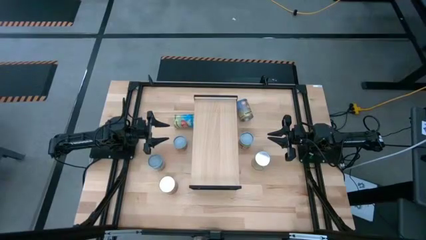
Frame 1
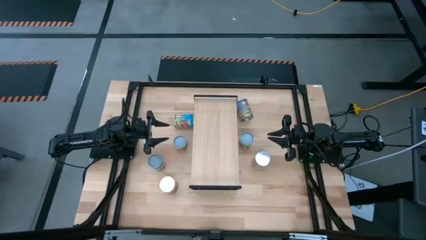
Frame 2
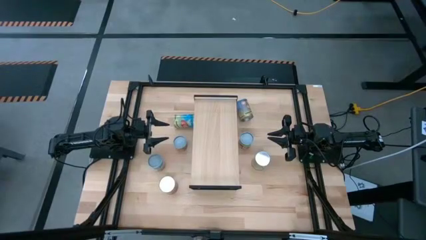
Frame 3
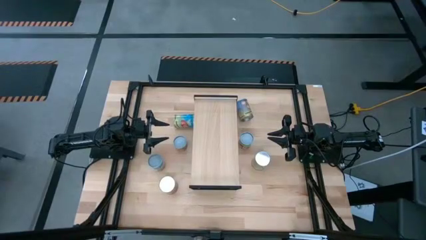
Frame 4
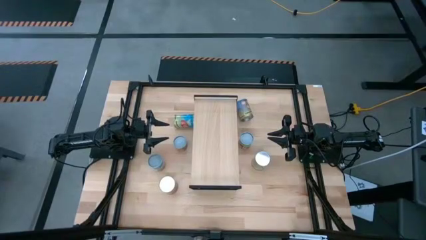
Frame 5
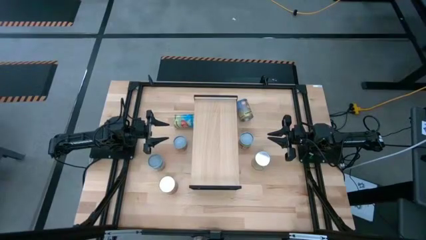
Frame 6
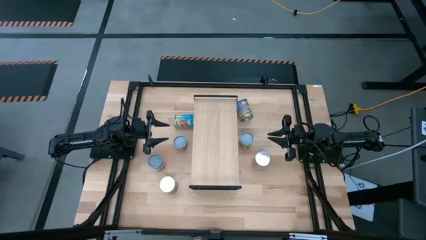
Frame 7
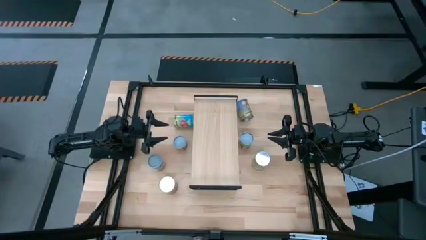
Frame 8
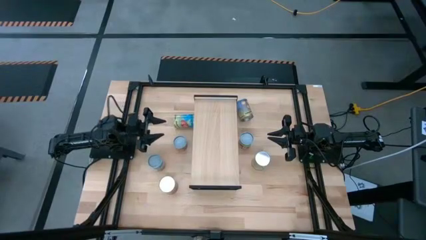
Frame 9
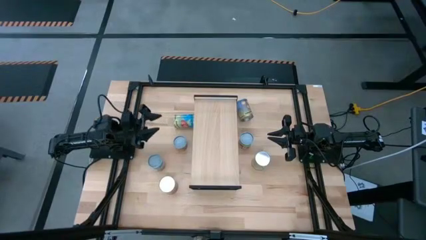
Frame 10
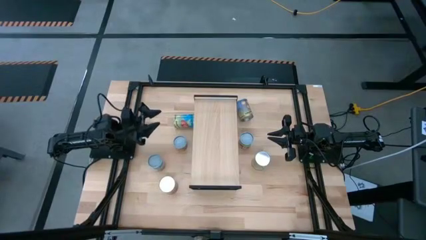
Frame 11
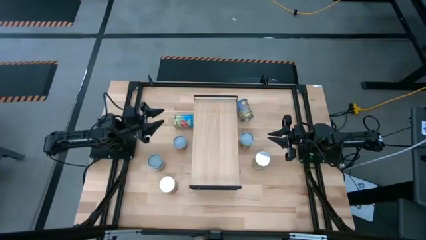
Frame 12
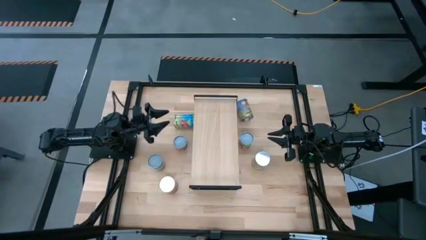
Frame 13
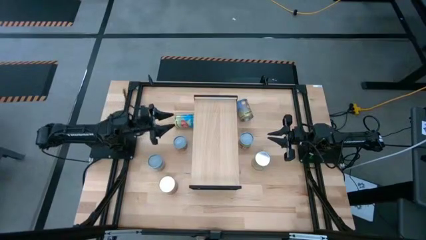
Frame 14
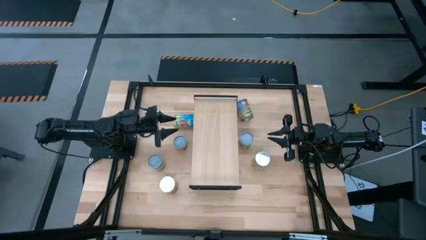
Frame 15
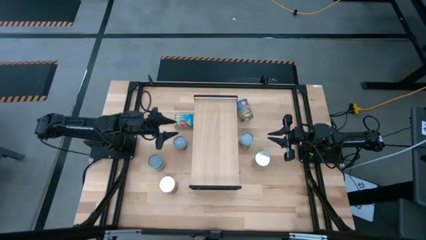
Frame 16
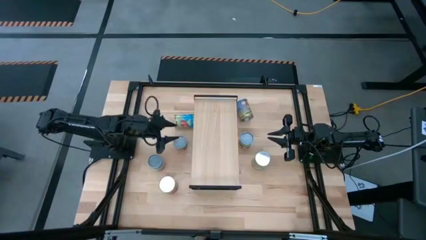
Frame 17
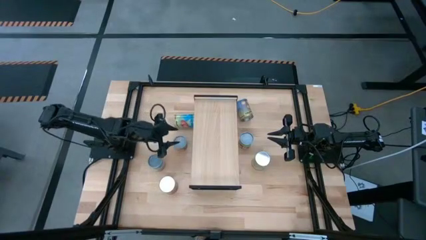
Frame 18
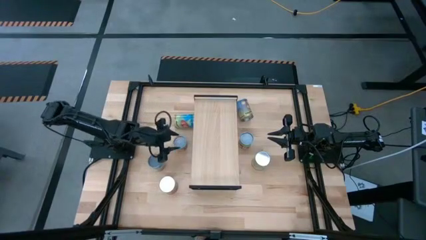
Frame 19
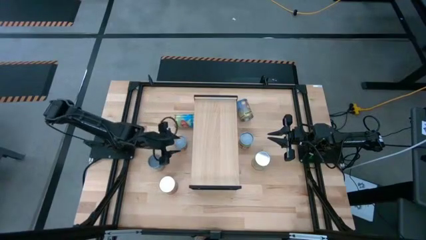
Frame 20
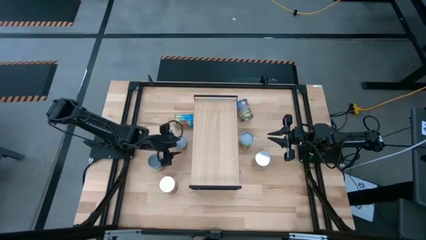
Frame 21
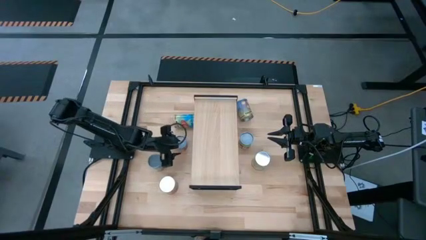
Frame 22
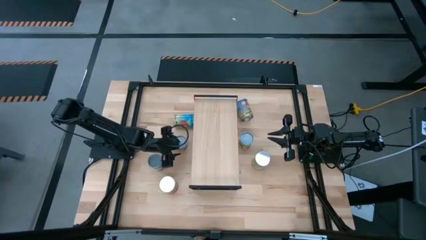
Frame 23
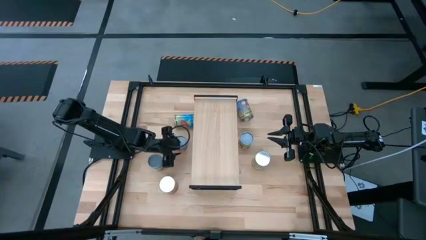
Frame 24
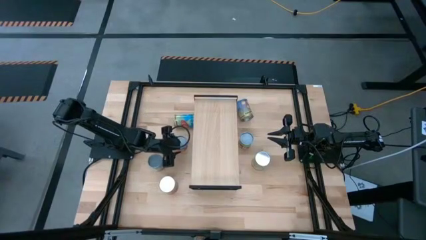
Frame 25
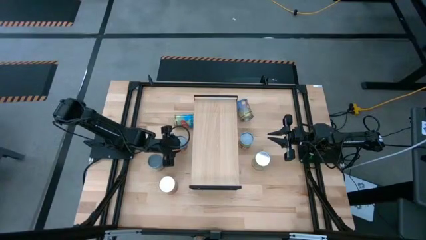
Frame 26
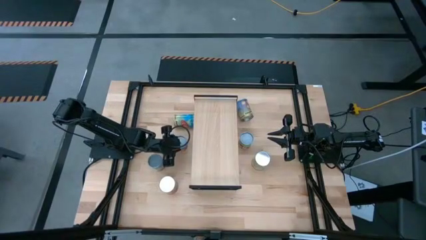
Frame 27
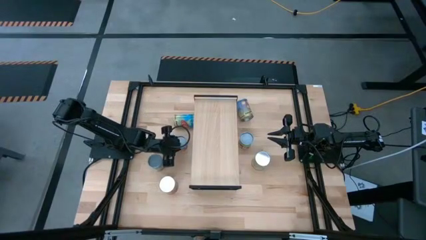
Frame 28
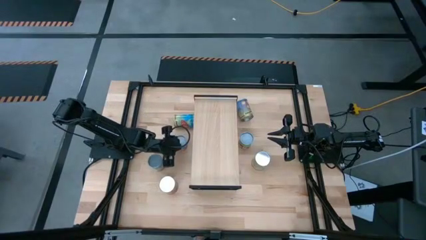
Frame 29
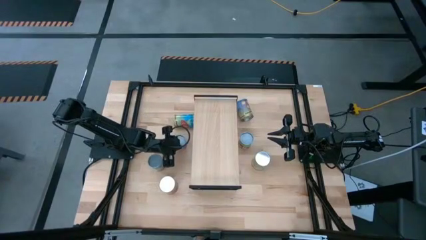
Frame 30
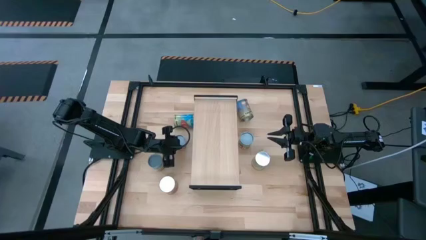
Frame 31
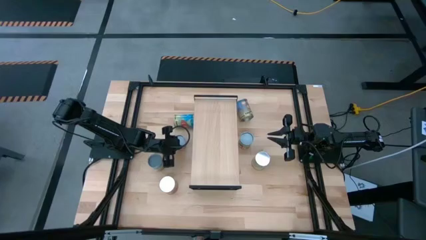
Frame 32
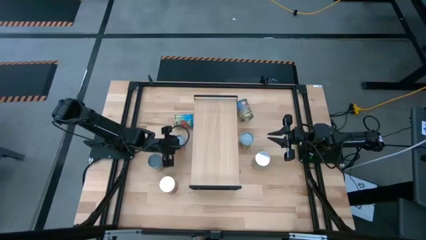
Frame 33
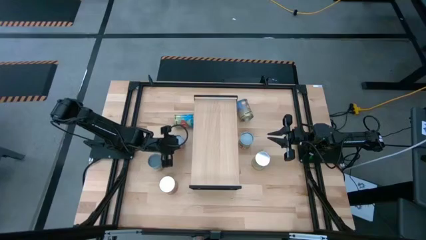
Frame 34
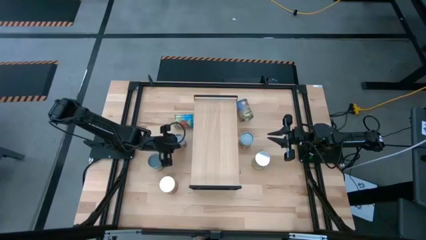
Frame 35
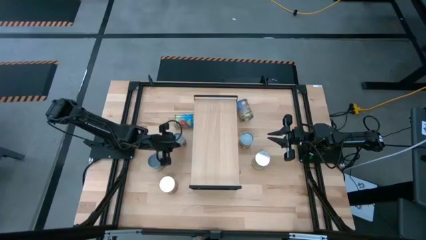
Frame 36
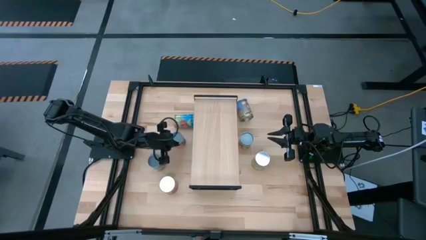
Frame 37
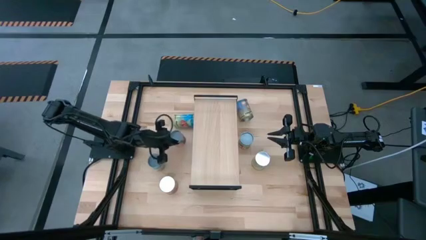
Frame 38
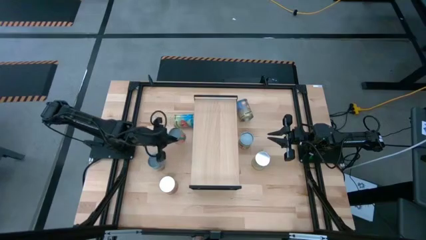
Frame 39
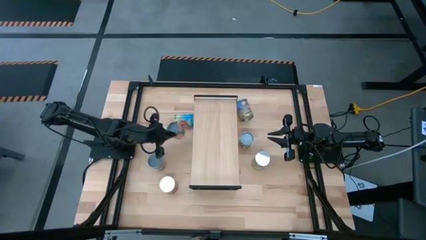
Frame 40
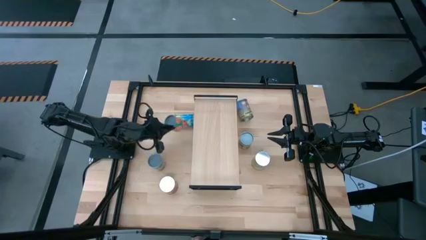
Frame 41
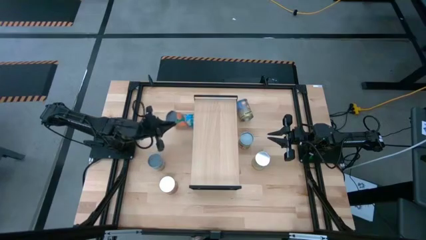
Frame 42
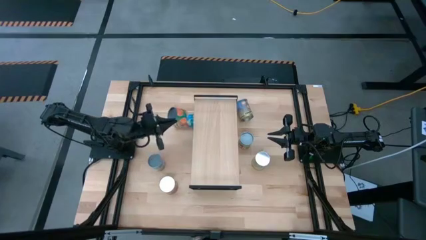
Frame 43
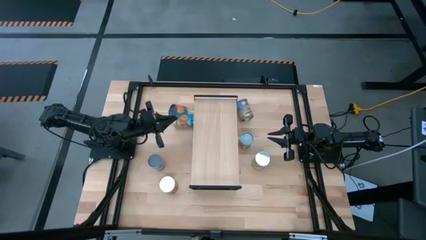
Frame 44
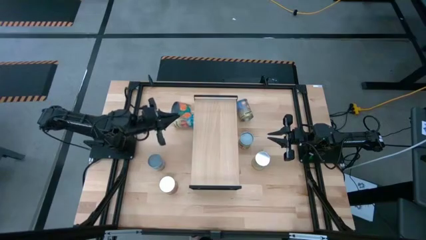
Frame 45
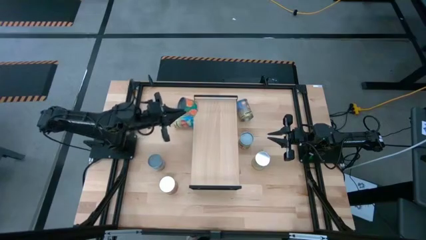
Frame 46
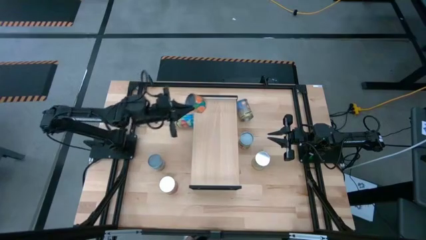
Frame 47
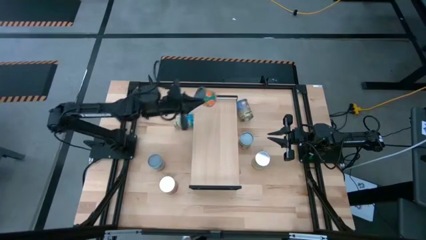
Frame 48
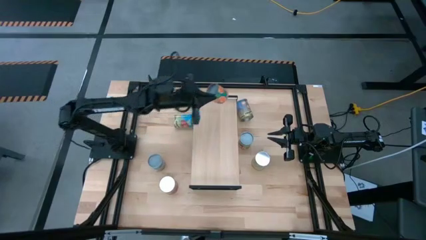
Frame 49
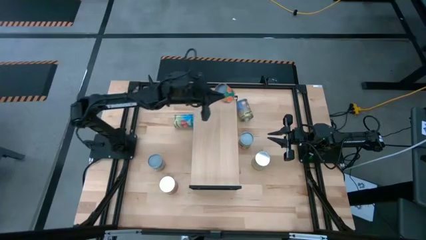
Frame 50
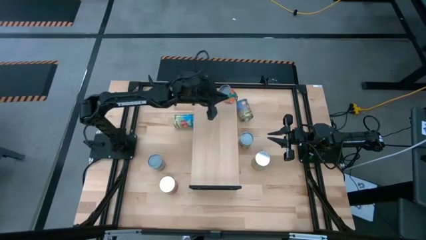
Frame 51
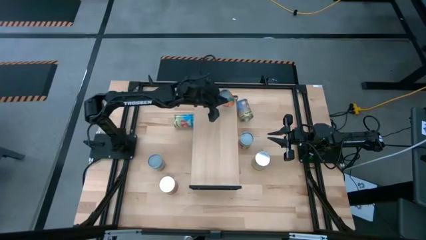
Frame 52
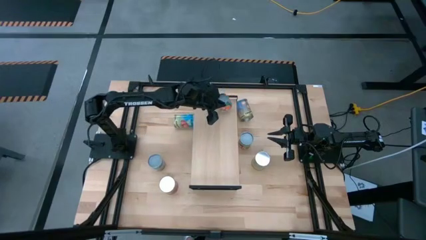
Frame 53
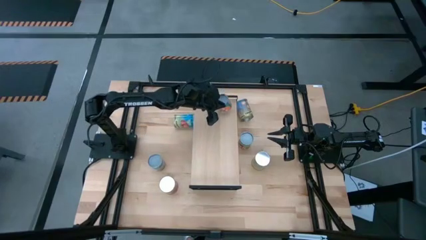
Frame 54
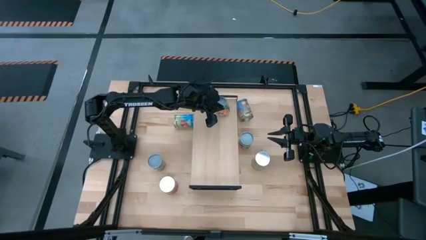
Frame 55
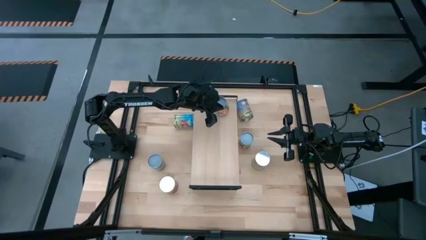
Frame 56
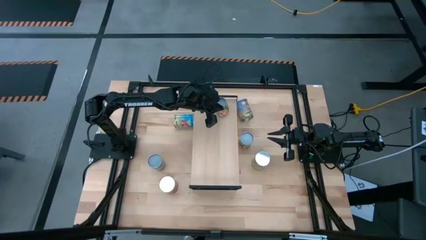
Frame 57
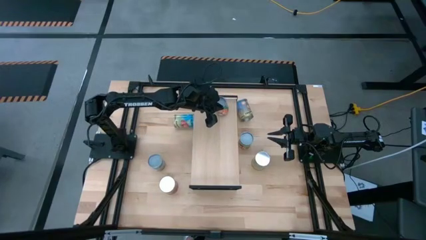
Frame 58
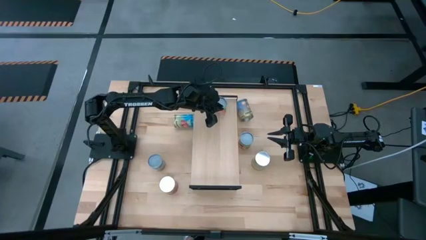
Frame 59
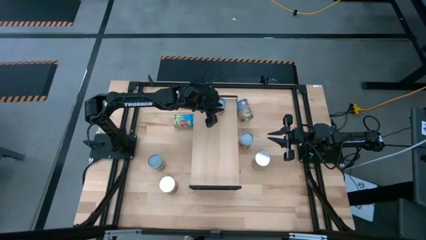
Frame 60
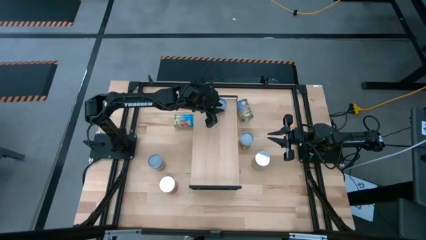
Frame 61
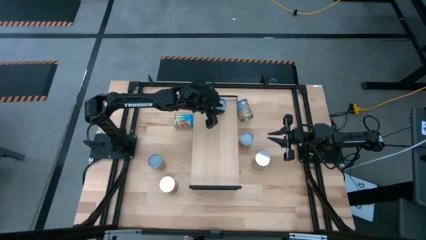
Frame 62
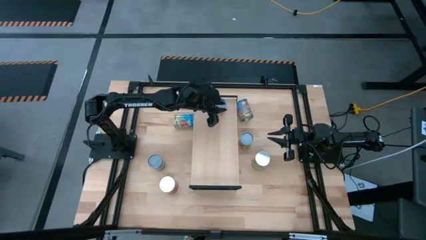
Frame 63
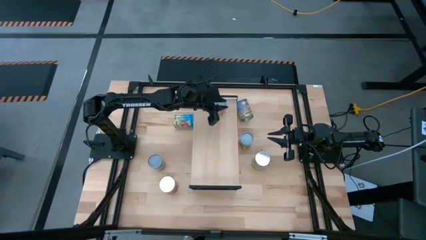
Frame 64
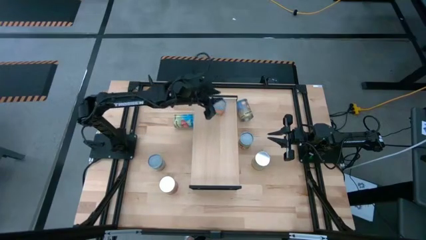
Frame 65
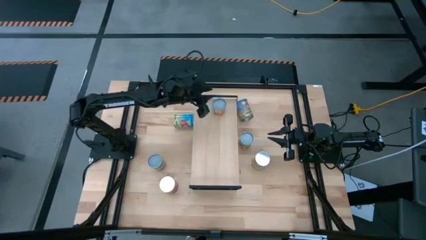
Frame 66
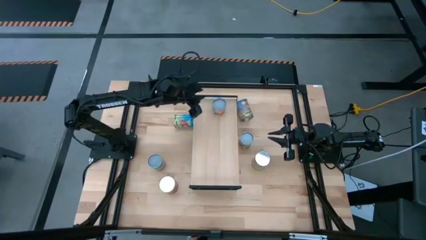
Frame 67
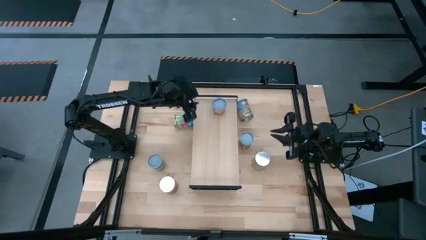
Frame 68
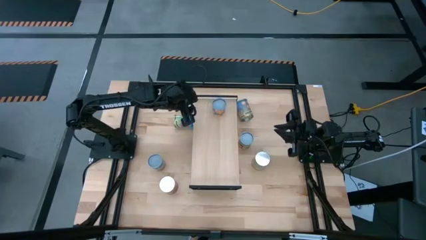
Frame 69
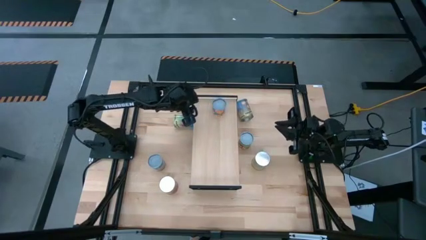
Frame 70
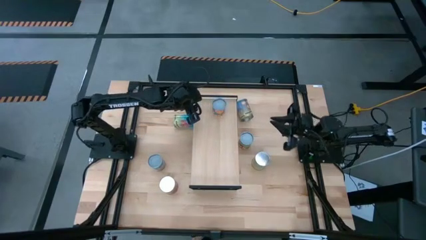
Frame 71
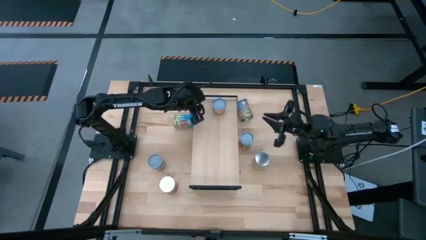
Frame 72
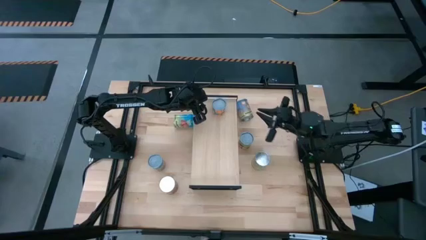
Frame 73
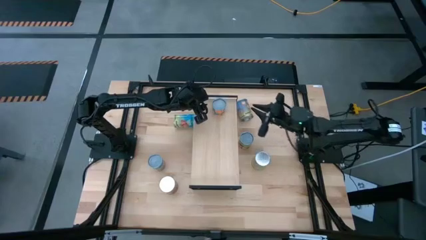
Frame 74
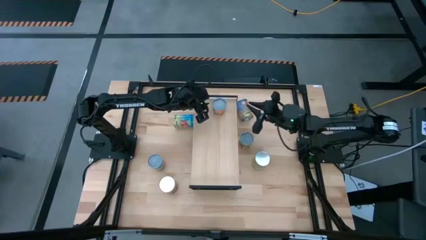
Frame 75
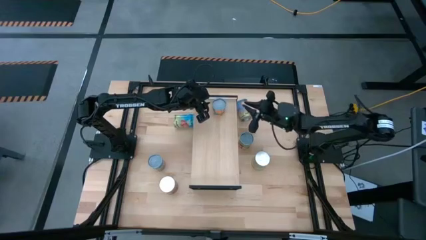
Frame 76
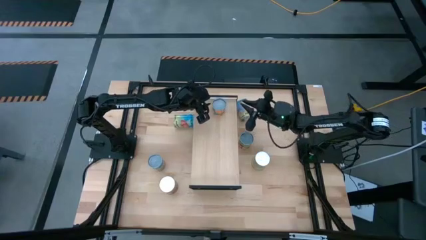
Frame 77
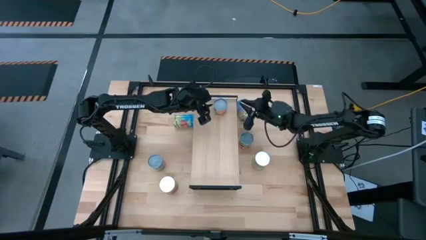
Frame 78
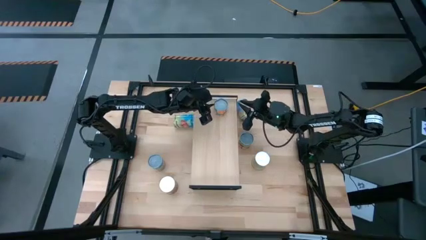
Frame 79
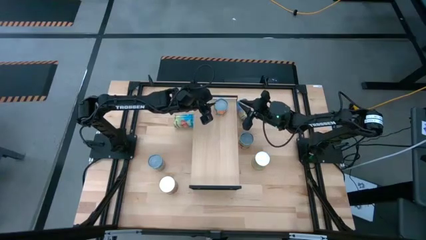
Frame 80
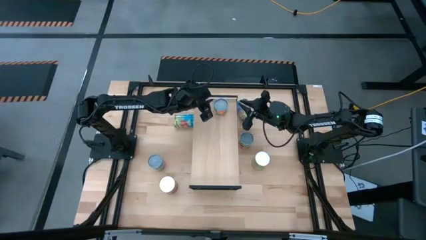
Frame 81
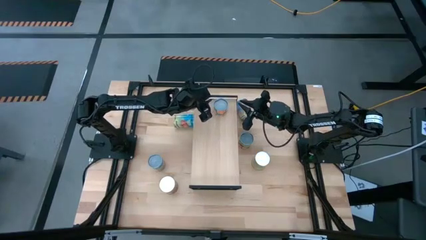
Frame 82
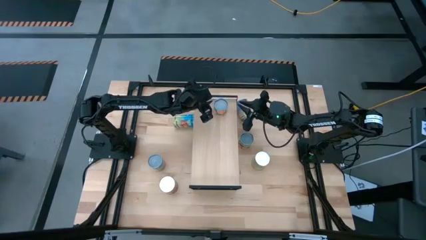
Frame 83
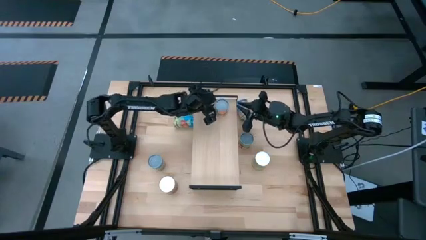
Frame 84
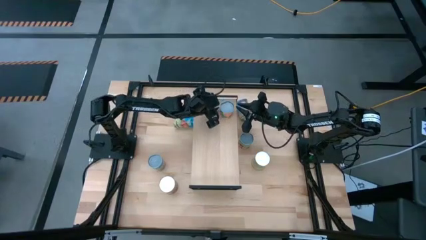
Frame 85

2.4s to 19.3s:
Task: Pick and place cans onto a shelf
Put the canned orange on the shelf
